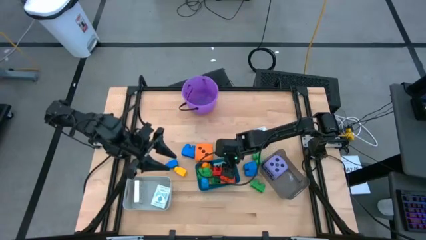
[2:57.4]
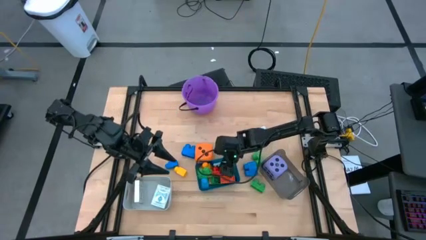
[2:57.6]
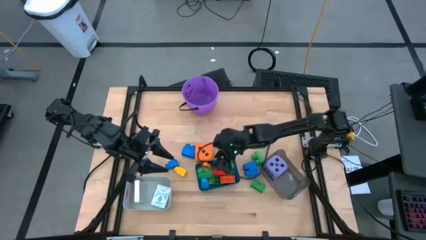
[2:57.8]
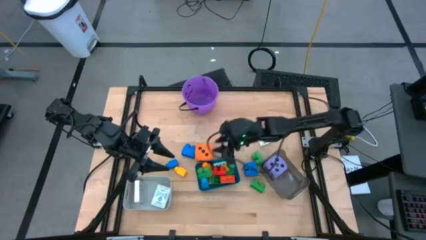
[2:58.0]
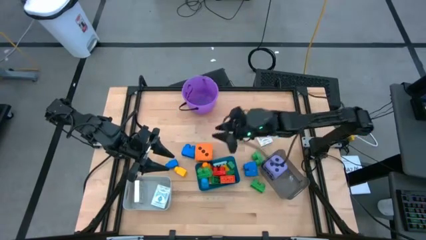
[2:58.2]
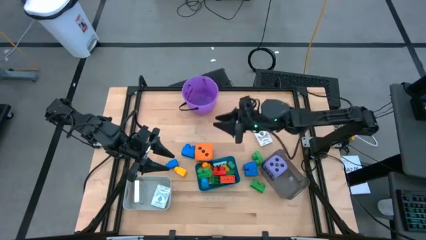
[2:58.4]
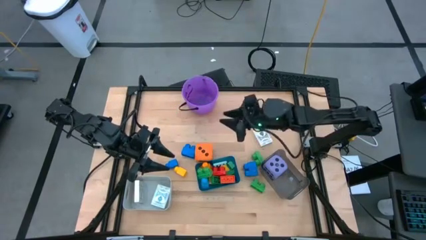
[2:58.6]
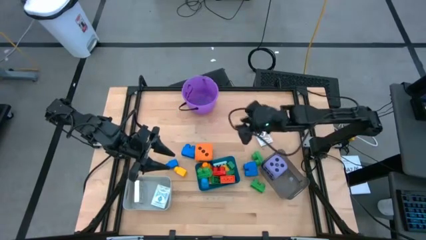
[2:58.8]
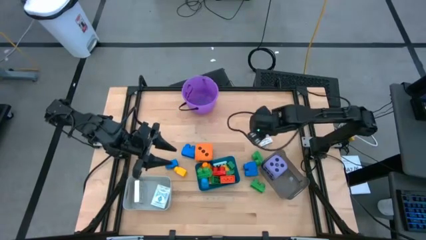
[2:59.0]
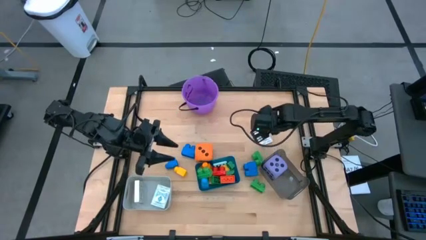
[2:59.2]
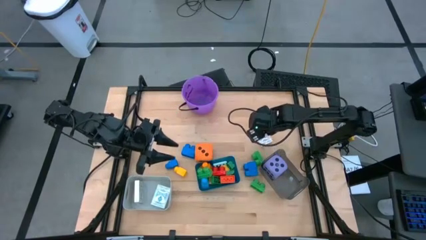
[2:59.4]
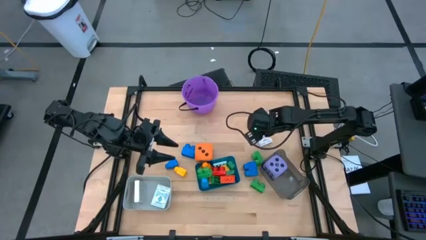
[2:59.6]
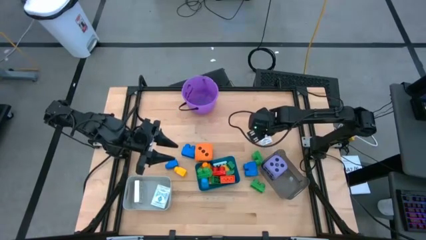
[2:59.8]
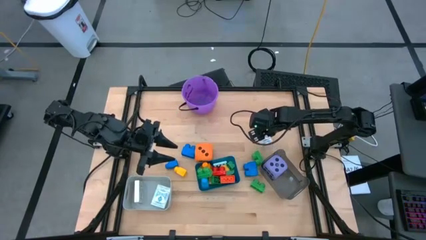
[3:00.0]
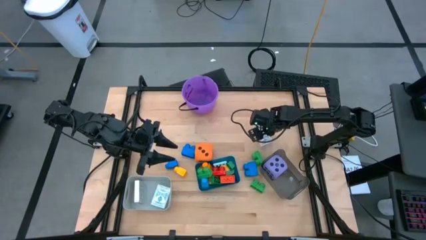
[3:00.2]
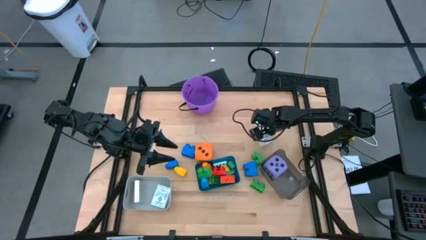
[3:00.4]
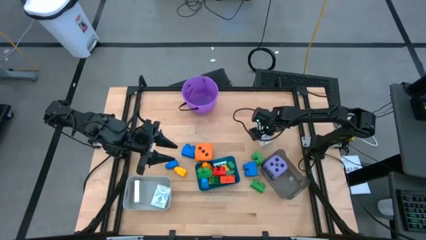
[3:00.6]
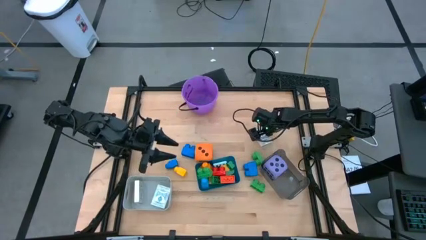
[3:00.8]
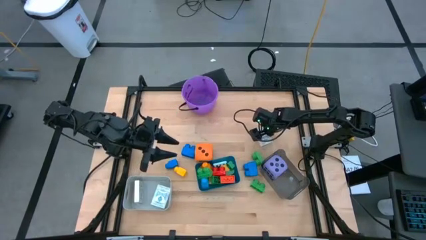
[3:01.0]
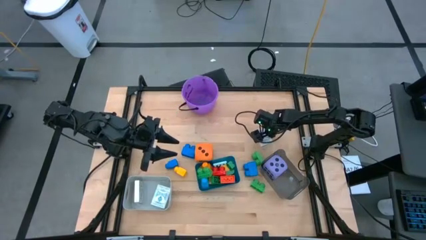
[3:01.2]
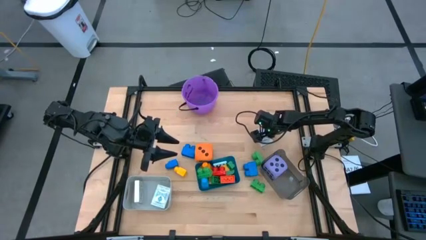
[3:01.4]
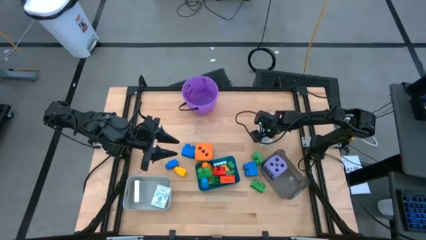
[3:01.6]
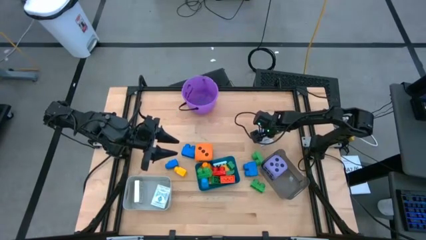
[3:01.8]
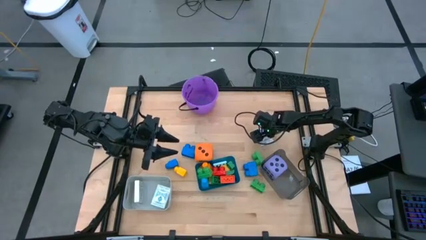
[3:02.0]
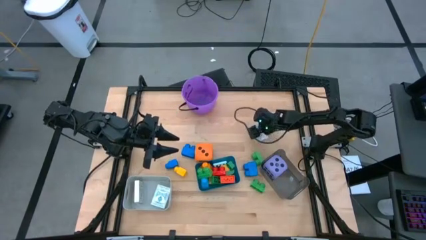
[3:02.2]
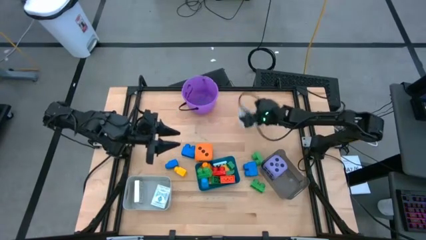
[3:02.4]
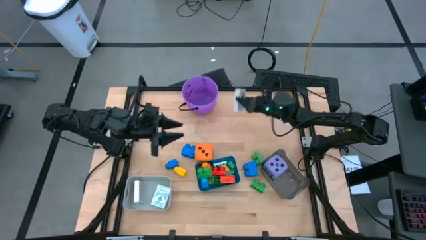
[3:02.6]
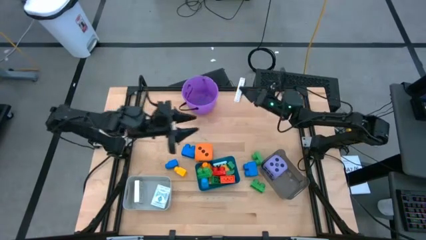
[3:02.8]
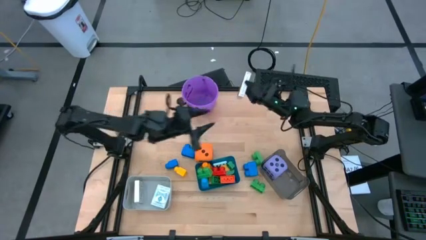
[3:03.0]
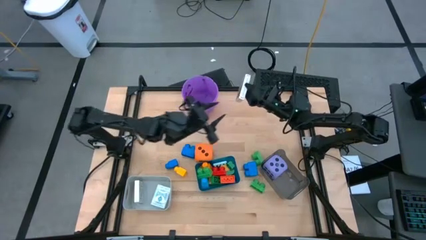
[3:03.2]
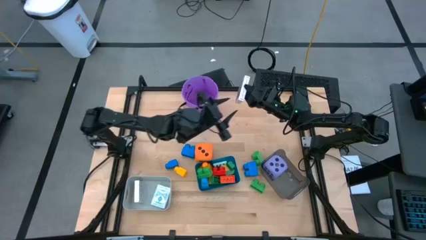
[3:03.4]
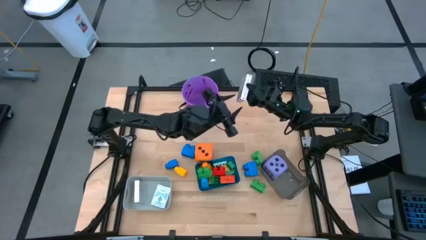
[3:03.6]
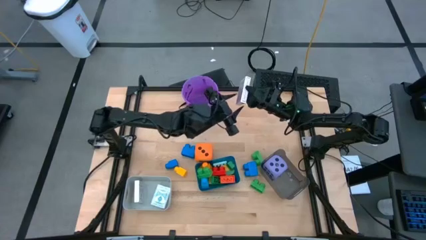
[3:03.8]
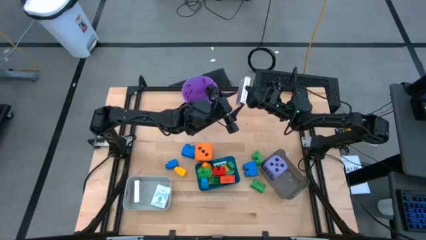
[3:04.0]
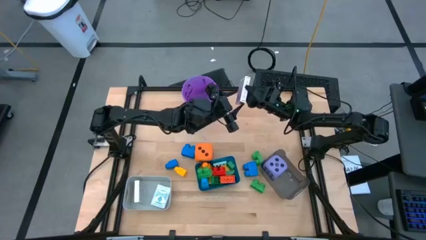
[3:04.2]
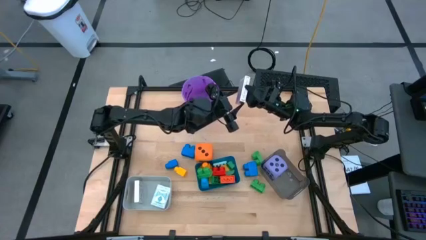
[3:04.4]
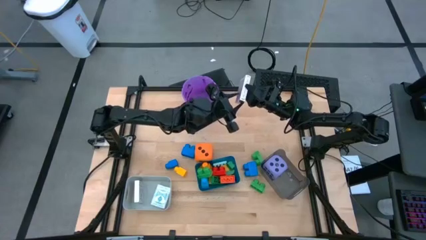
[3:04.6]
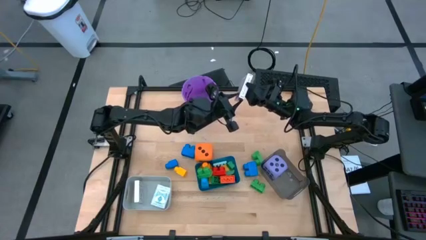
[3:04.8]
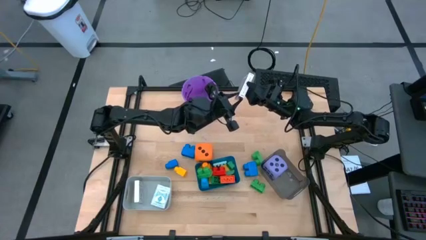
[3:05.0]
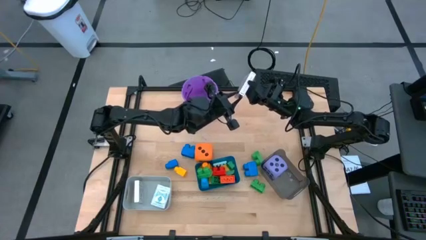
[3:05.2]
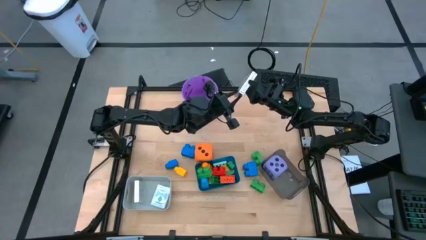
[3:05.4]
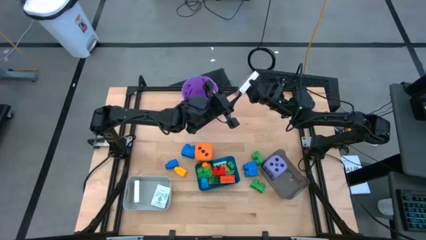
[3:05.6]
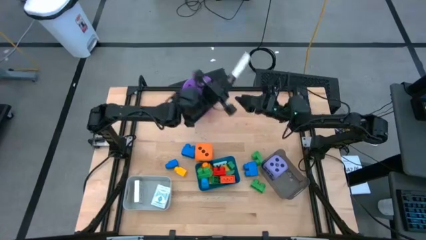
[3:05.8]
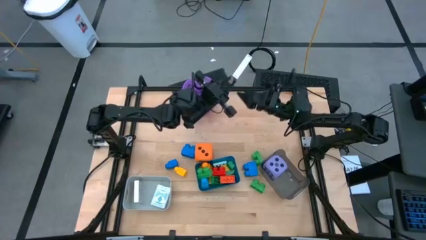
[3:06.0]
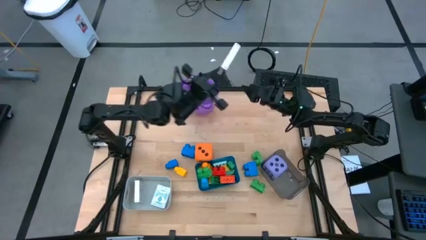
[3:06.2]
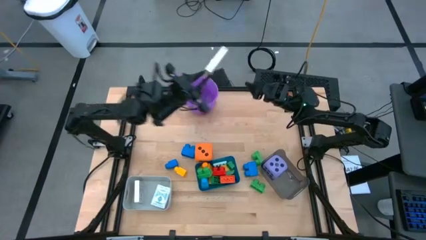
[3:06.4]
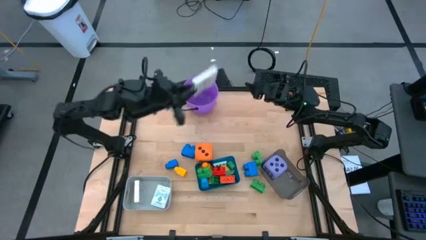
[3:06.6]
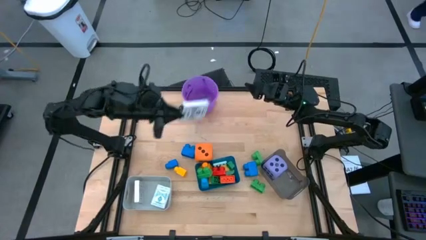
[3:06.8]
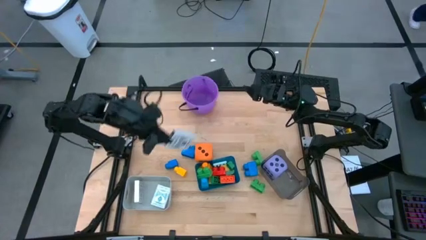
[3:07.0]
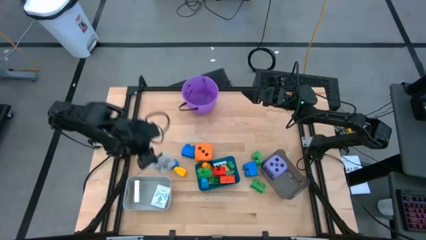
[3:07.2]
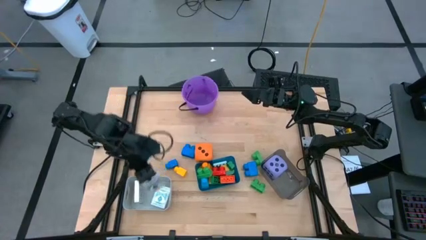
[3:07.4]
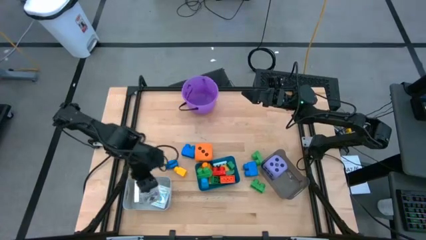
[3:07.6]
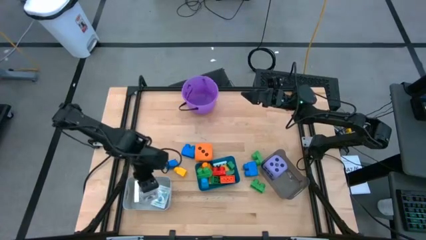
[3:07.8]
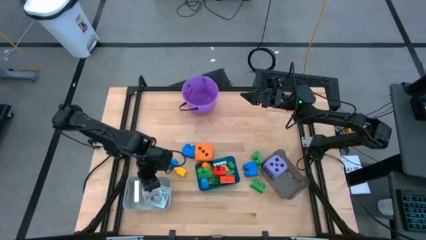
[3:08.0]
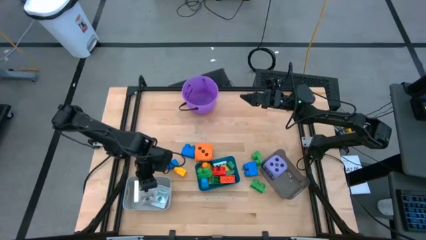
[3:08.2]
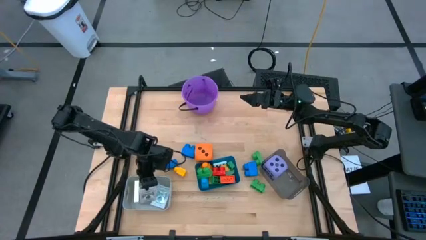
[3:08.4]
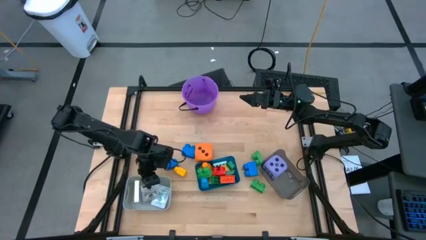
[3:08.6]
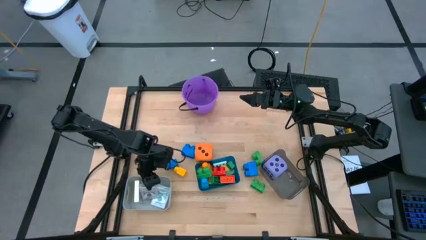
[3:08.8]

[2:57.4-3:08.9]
Task: Pick & Place Toys
Put the black deck of cards into the gray bin

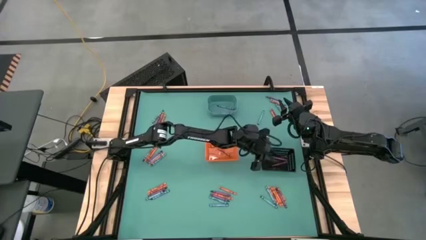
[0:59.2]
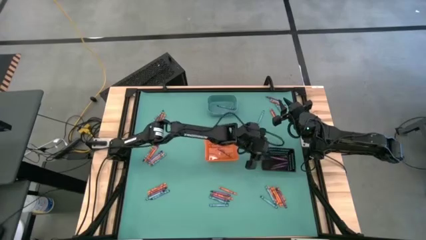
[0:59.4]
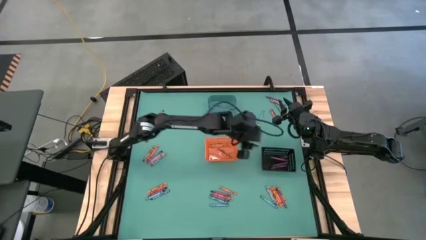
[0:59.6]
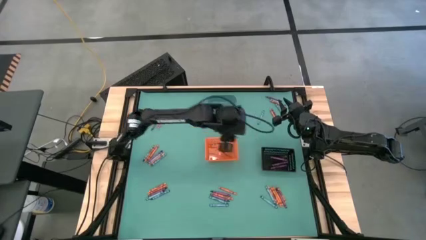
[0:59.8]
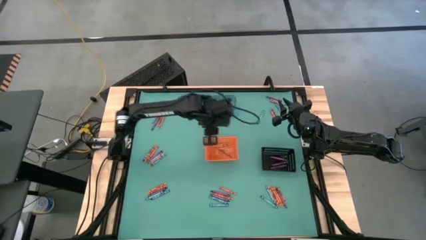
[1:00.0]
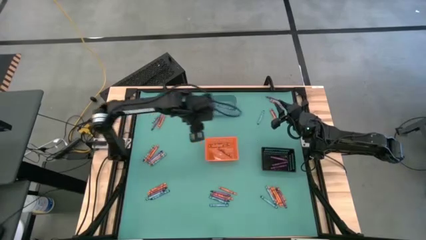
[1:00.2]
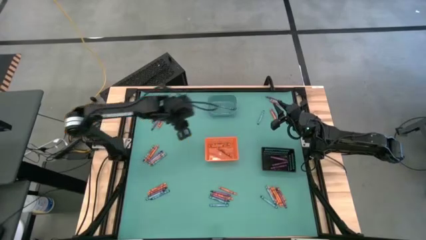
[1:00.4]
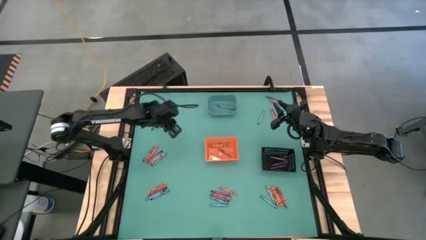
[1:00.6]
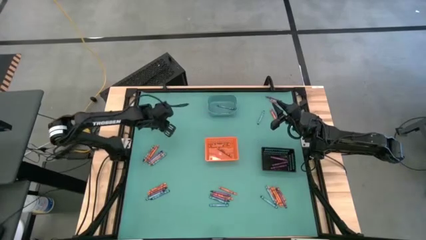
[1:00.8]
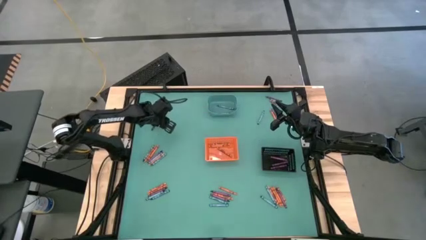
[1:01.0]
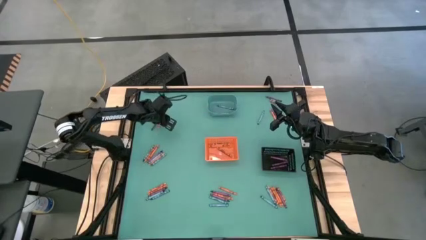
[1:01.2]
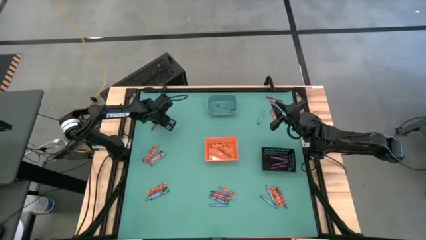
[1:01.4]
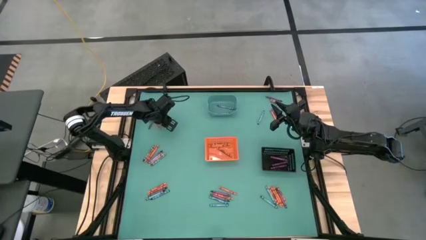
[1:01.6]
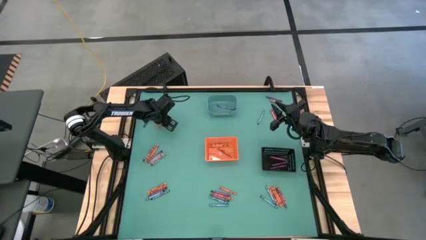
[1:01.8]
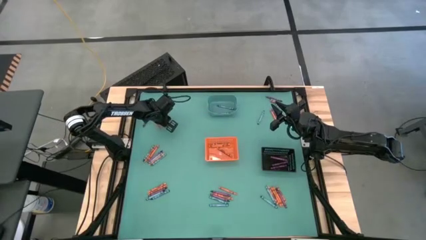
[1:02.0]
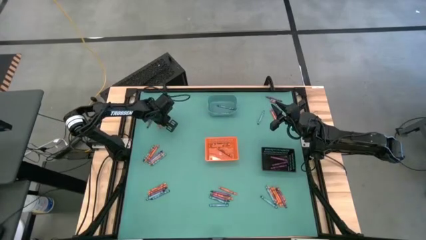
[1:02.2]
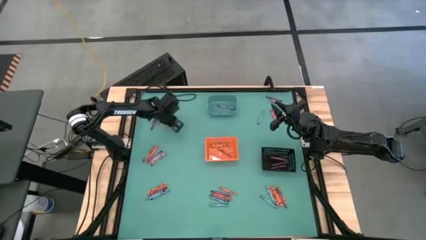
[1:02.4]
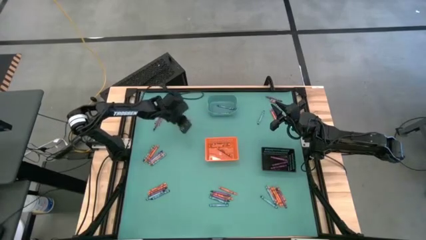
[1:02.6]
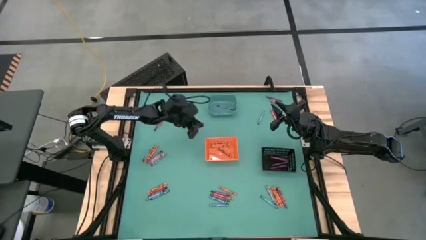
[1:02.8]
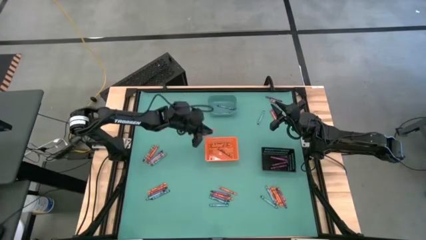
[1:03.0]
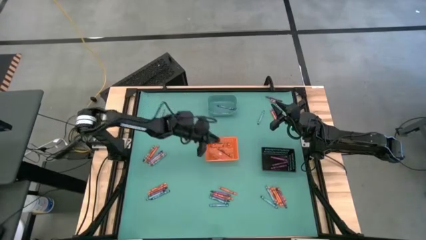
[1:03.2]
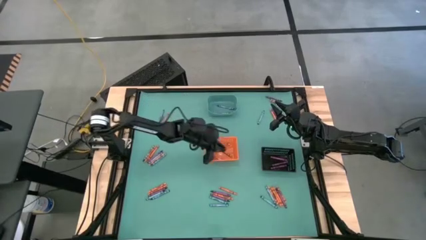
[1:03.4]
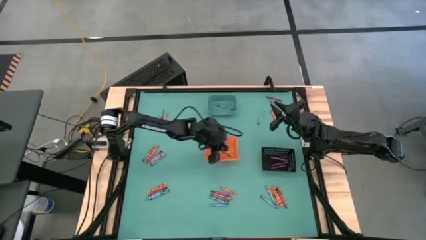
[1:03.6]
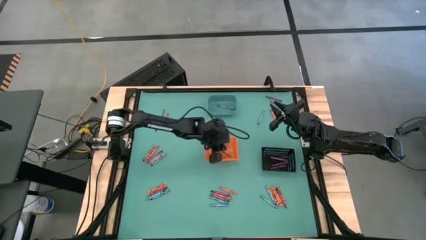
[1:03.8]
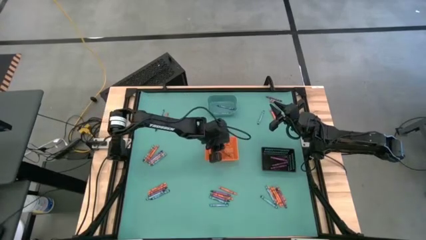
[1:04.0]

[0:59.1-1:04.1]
Task: Sort crayons
Put the orange crayon into the orange bin
